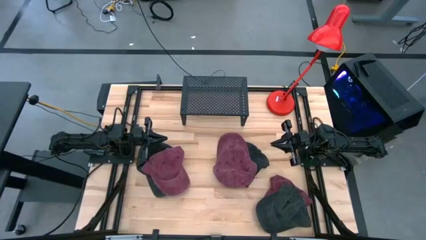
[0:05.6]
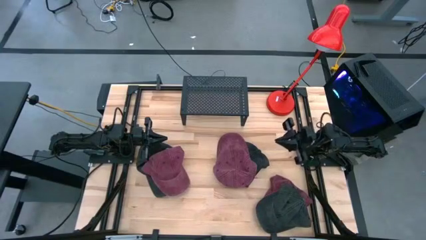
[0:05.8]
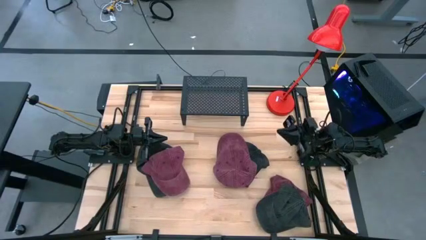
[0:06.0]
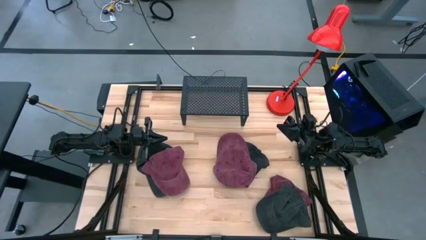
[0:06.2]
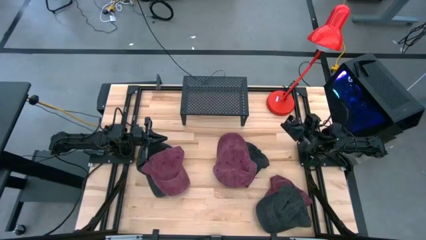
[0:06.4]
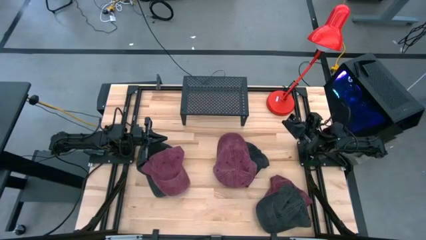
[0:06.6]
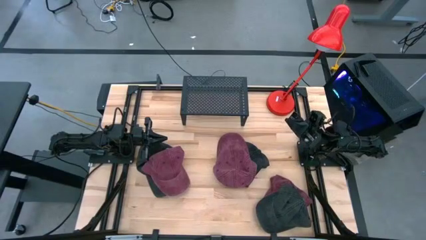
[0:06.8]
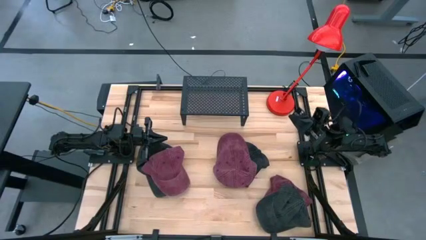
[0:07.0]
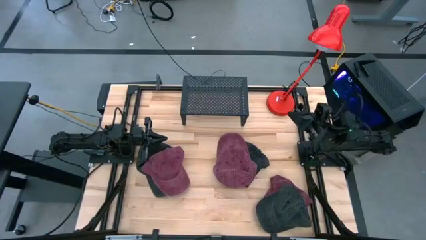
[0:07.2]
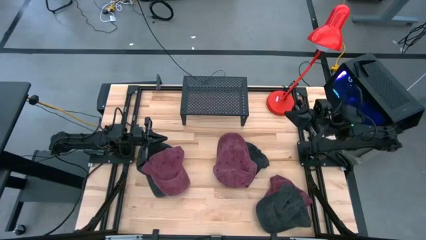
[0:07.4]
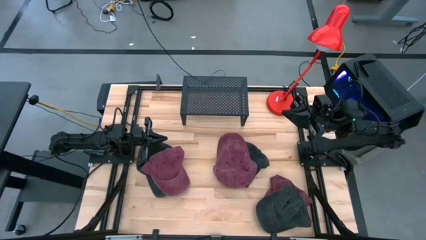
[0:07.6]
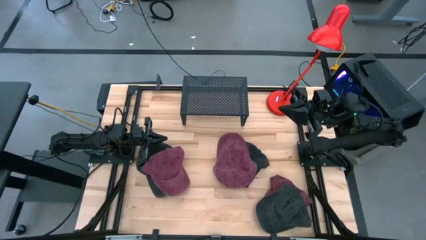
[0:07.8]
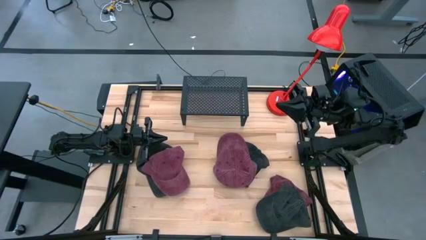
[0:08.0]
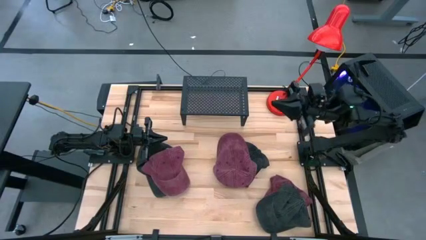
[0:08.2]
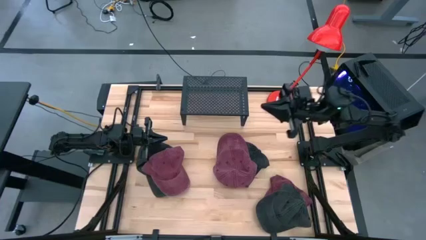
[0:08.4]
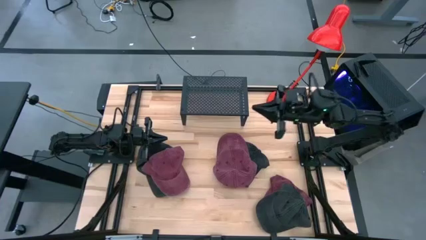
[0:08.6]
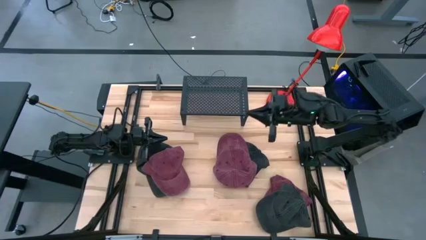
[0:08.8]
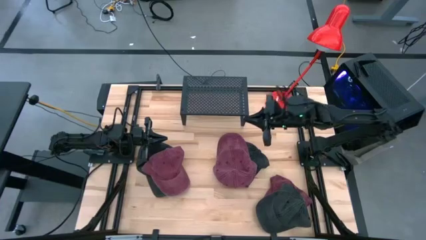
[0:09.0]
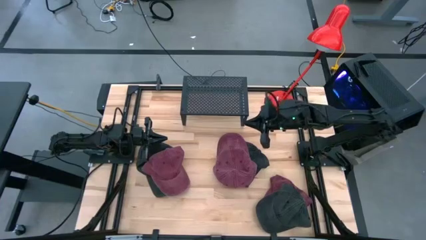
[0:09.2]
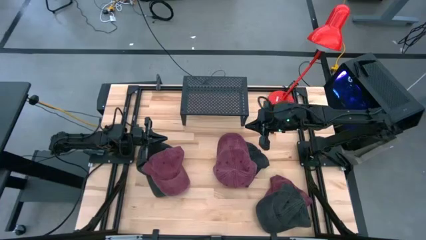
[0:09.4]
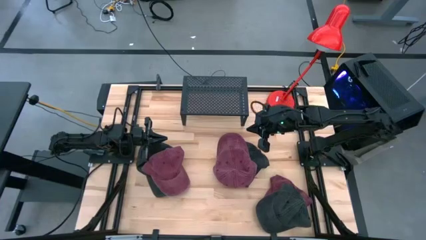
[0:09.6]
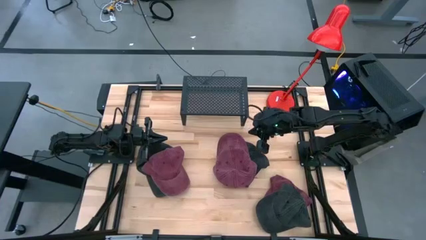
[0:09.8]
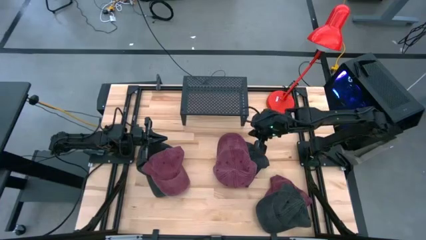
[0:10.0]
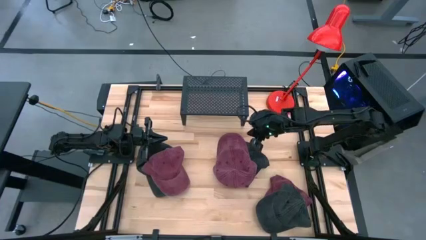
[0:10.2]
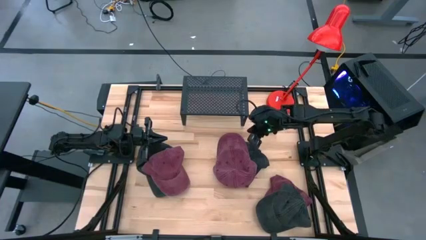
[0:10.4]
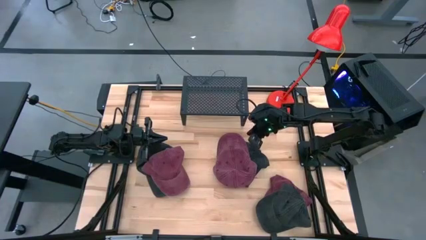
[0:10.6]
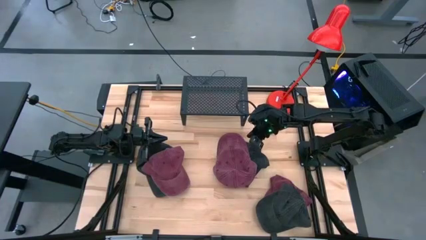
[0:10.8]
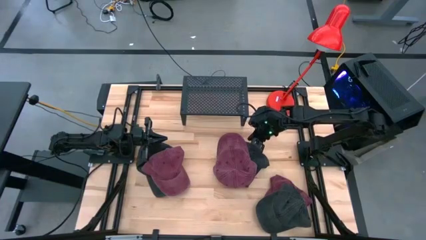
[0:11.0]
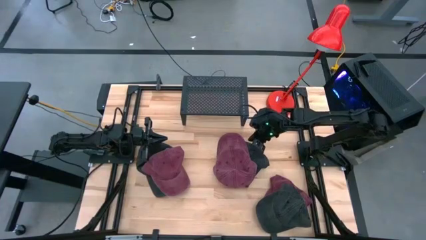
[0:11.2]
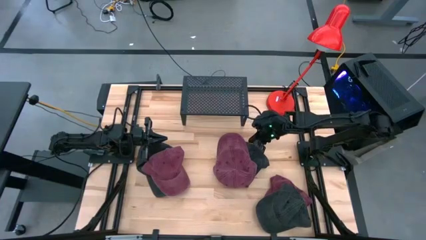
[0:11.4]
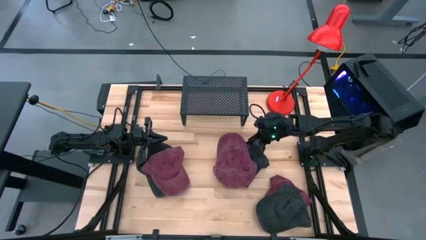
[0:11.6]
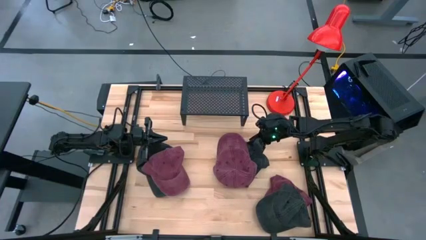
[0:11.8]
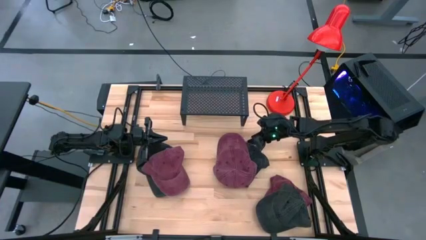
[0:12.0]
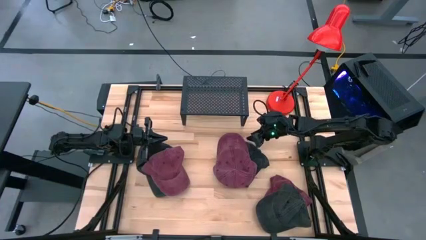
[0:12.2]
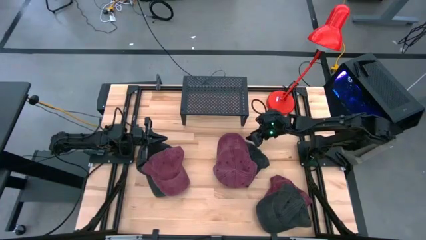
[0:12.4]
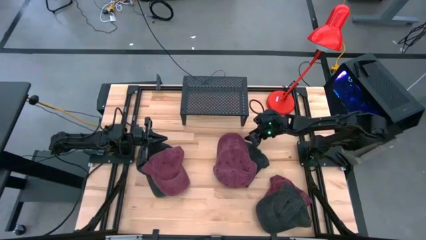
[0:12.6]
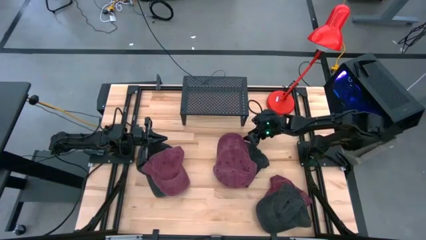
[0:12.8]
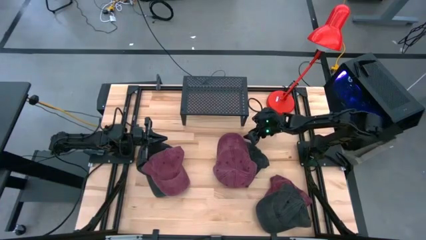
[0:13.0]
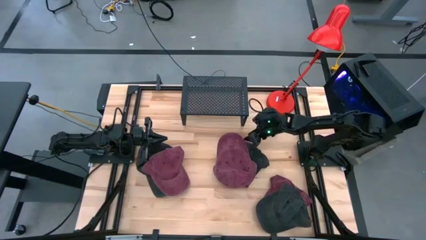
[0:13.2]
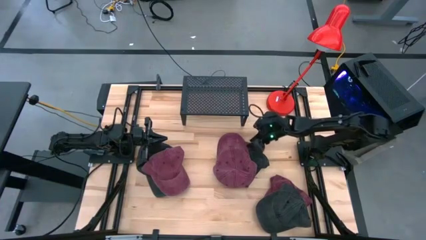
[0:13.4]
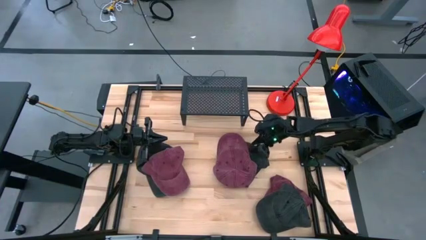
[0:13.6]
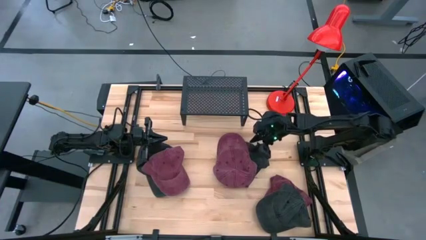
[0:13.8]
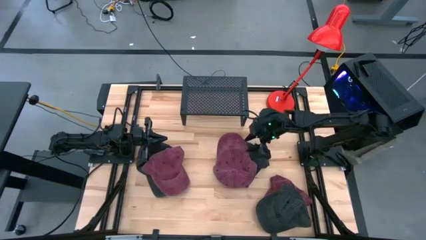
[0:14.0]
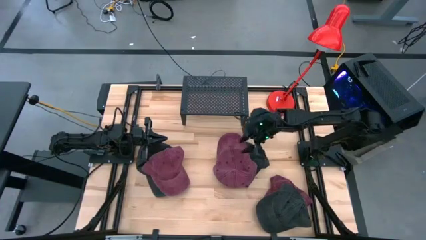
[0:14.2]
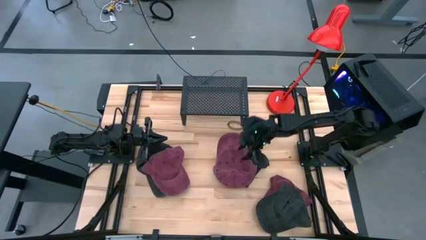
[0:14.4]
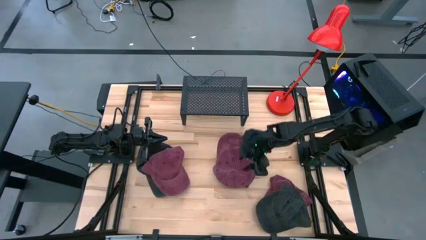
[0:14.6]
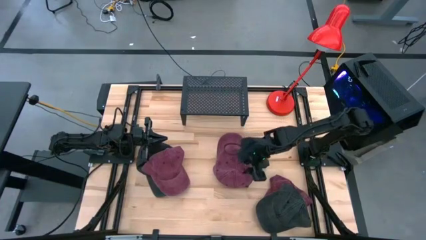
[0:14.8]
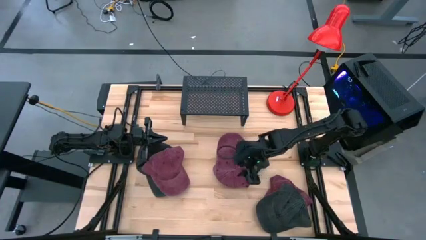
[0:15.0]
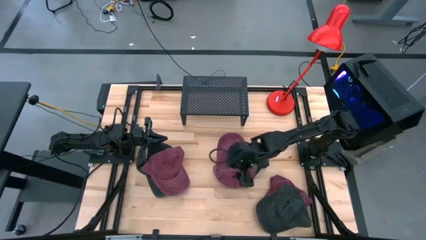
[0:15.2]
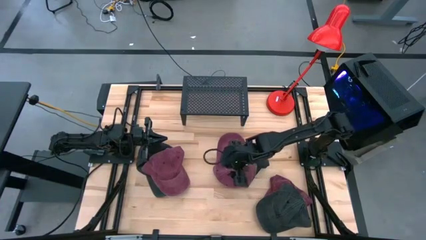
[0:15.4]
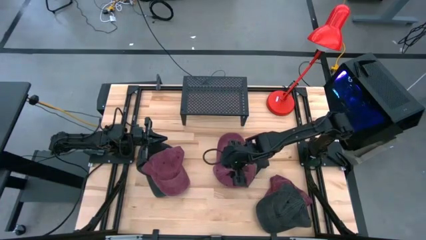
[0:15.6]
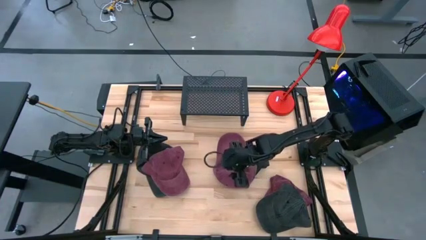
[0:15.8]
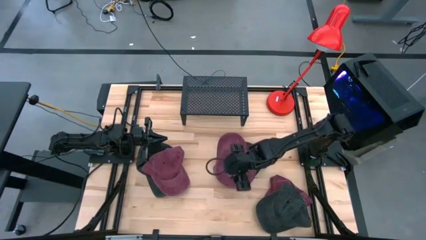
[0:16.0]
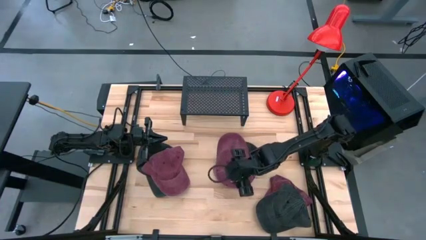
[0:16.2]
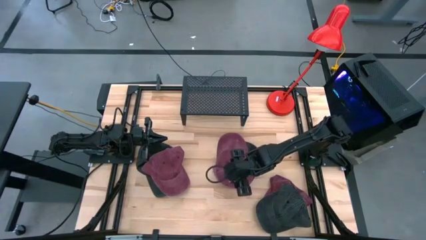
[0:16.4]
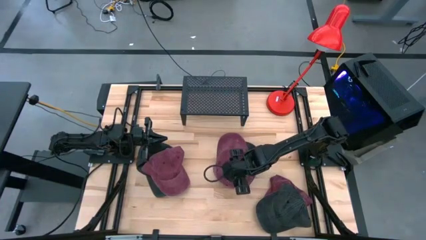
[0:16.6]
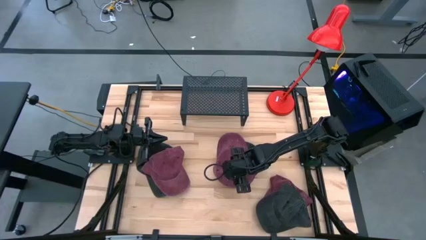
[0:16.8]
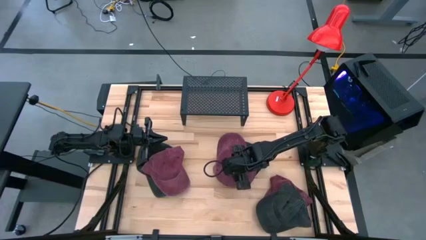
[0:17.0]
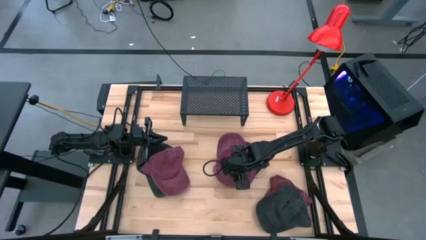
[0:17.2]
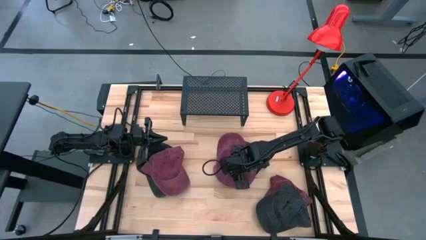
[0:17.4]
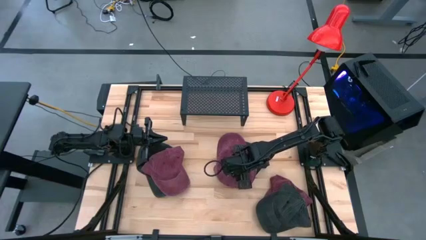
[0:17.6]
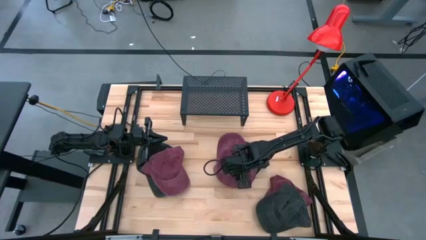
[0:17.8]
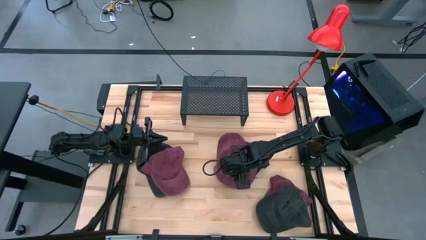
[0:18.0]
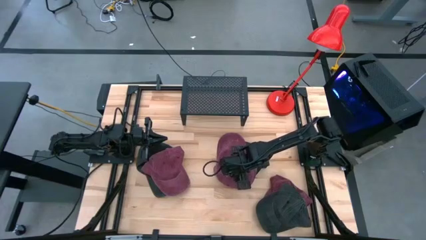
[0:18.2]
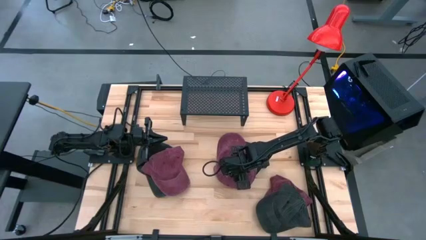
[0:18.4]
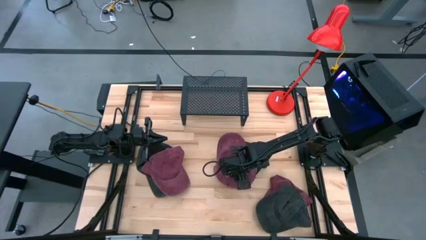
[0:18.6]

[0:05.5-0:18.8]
Task: Pick & Place hat
Put the middle red cap on the shelf
